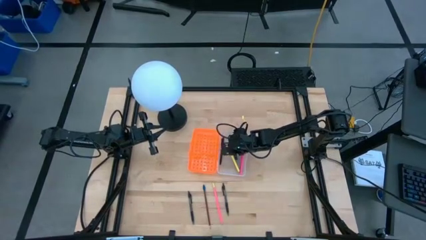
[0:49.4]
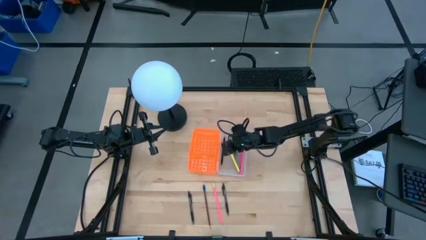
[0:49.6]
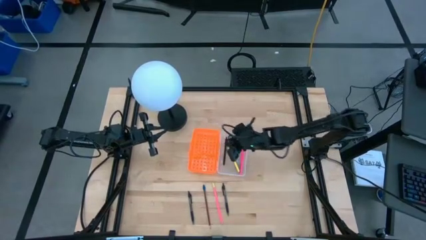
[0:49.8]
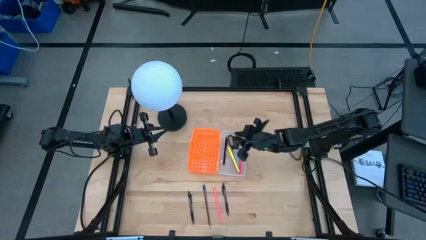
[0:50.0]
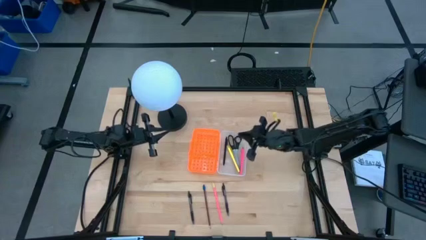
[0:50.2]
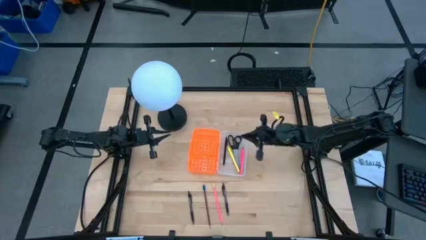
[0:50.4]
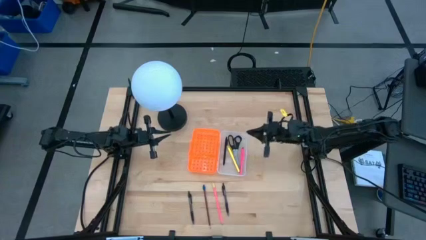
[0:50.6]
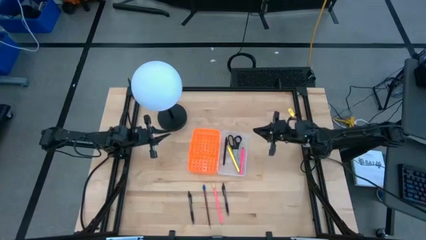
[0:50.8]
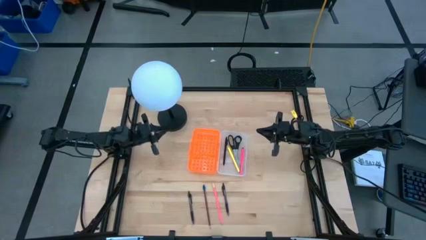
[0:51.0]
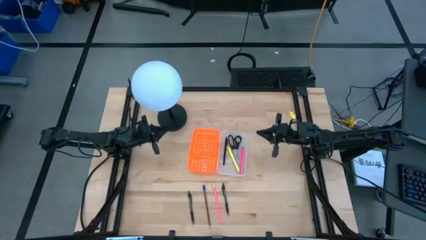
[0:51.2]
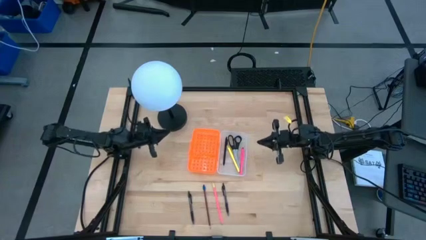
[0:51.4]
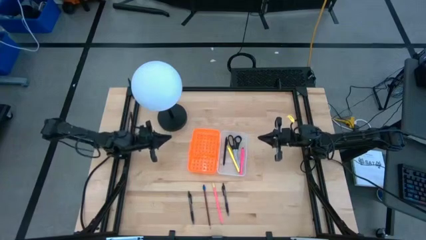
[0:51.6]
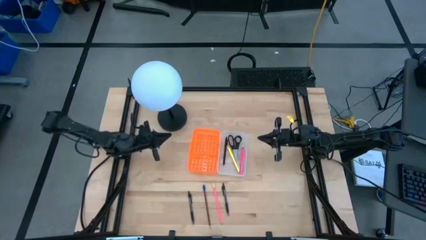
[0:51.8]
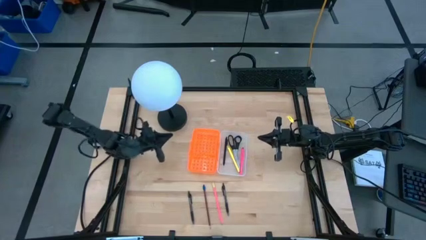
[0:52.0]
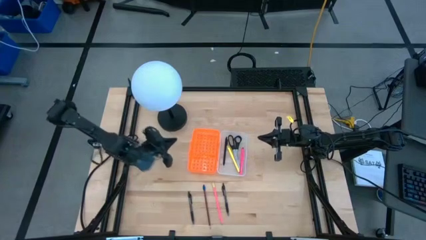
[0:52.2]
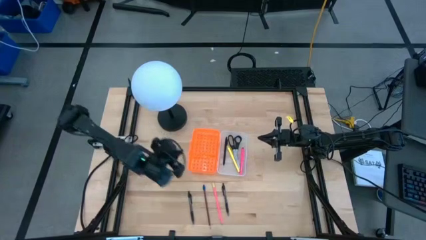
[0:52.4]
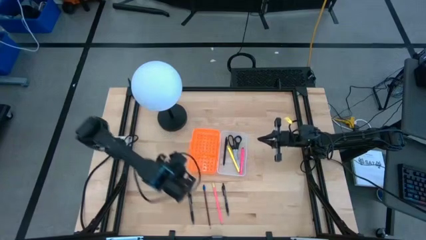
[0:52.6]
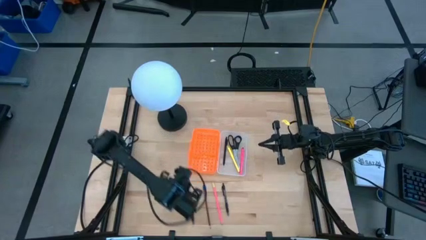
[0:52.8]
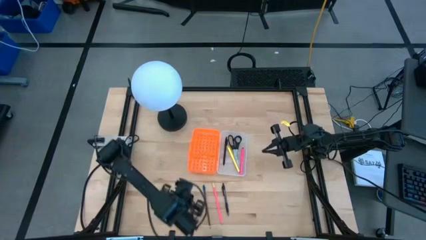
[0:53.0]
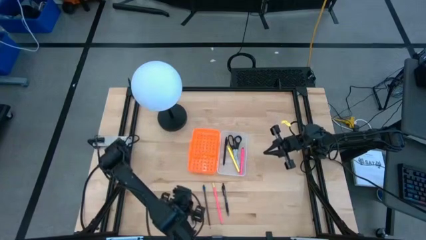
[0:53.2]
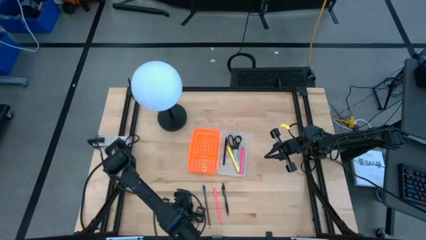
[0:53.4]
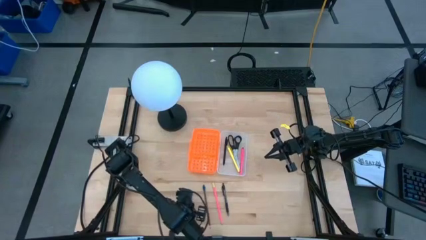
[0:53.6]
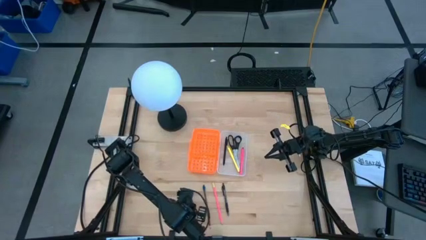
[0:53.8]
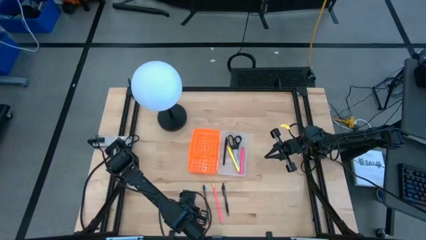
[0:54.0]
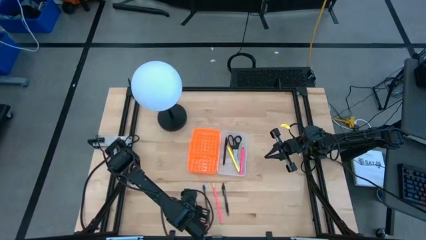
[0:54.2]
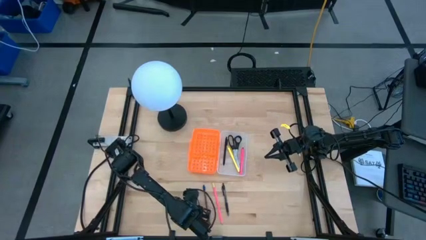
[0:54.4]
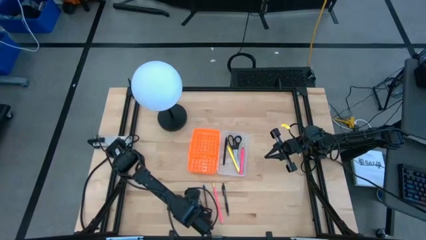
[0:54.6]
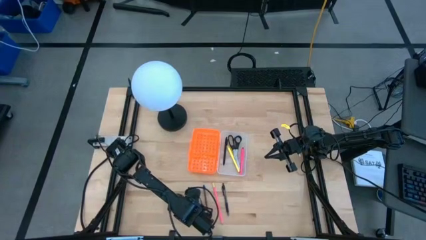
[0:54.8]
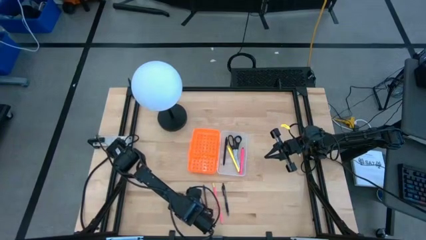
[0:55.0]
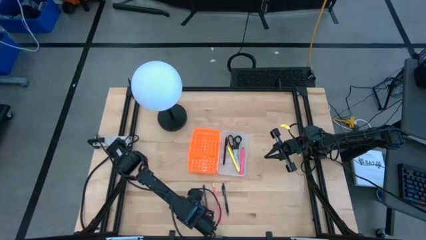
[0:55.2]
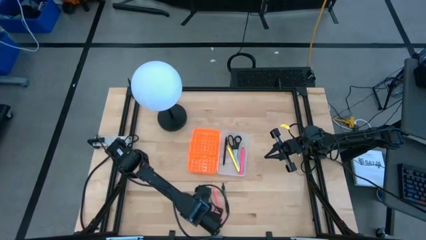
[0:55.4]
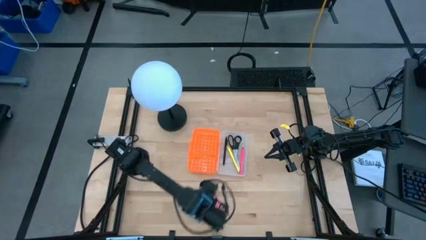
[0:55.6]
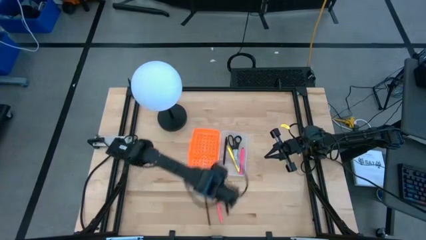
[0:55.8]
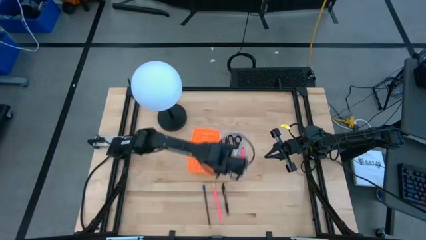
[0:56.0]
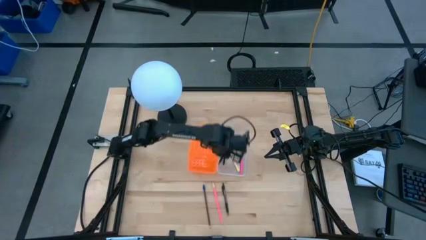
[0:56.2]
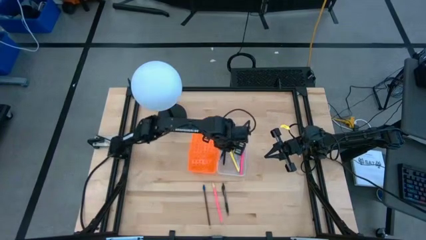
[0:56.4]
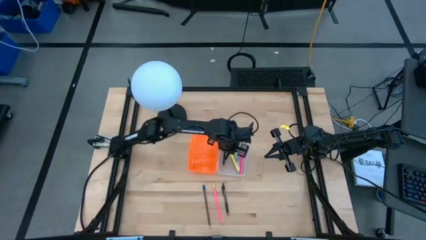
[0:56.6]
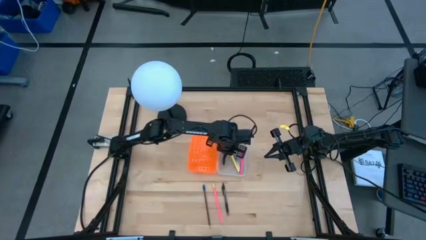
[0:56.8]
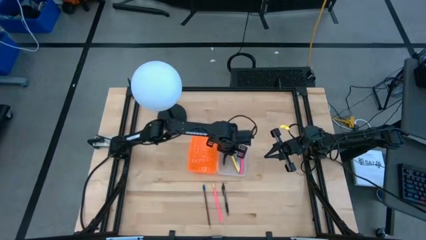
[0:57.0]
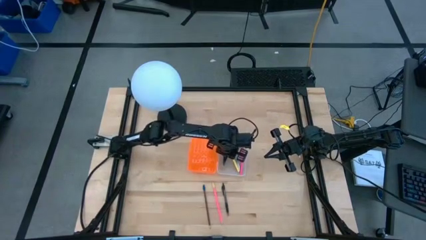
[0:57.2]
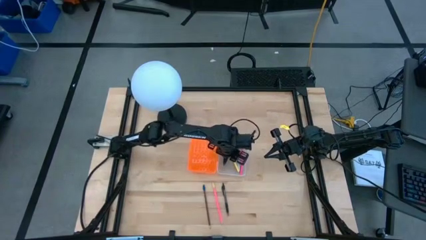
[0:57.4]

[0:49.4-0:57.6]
Task: Pick & place school supplies into a supply box
Put the left black pen into the orange supply box

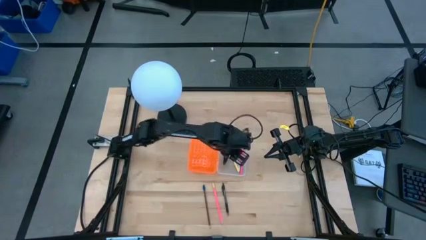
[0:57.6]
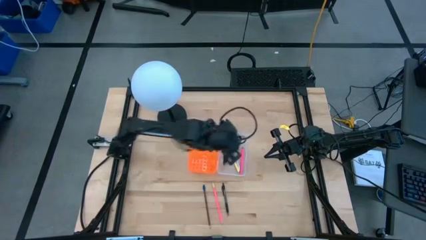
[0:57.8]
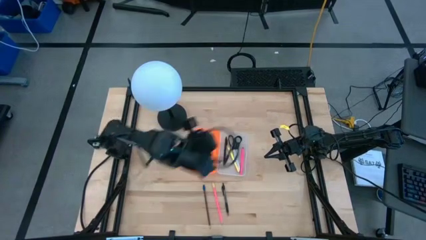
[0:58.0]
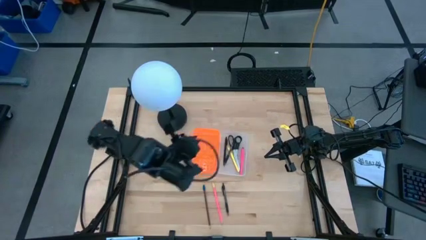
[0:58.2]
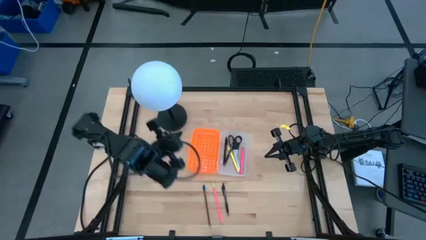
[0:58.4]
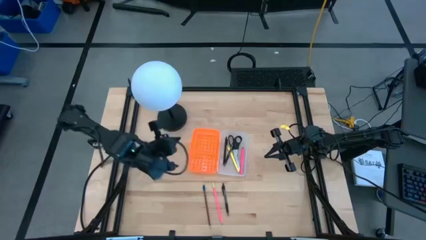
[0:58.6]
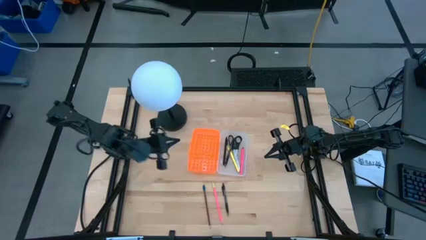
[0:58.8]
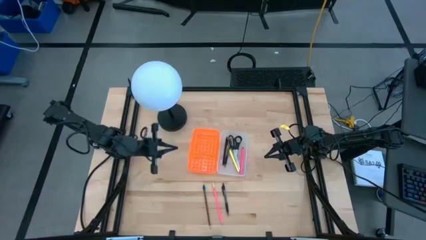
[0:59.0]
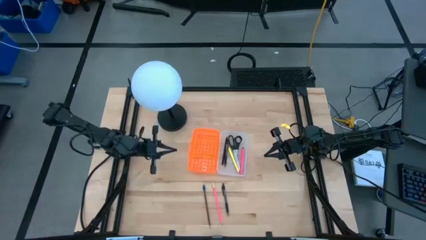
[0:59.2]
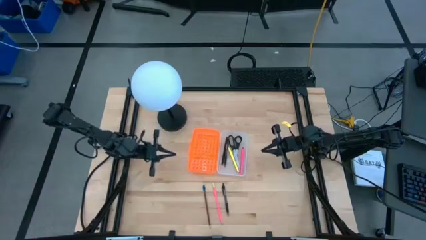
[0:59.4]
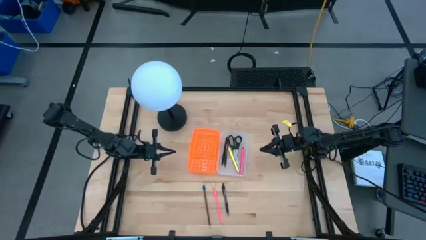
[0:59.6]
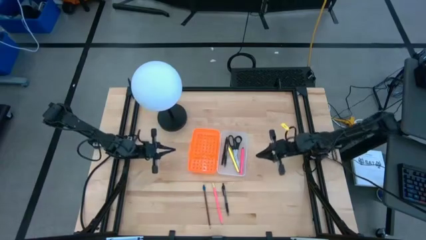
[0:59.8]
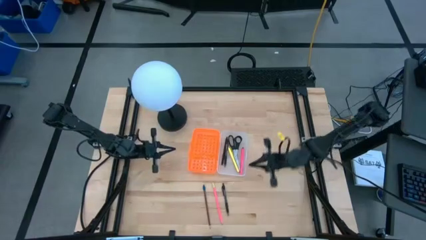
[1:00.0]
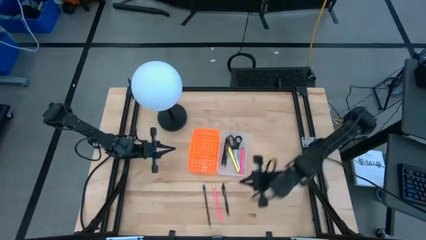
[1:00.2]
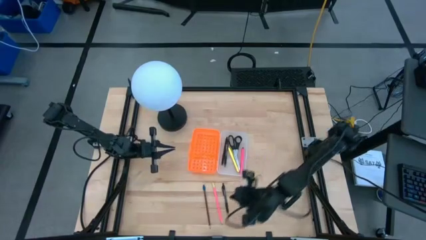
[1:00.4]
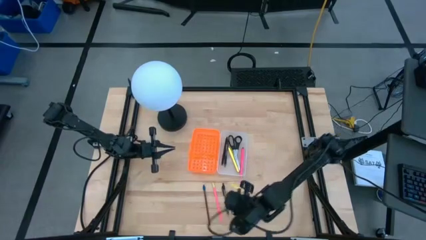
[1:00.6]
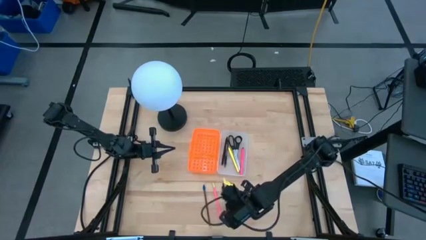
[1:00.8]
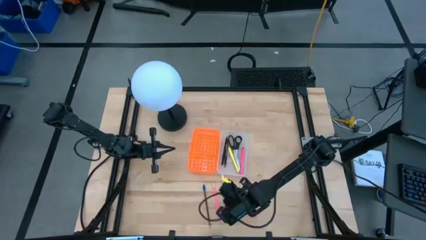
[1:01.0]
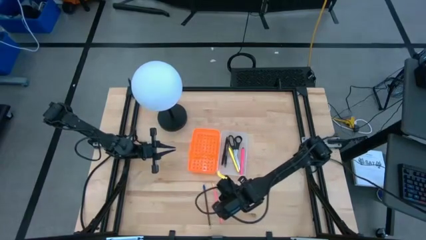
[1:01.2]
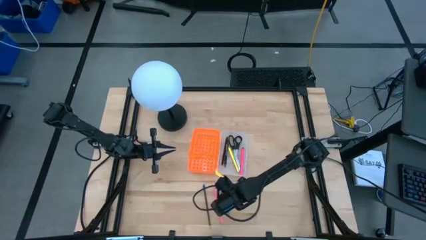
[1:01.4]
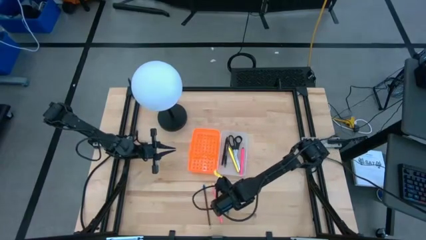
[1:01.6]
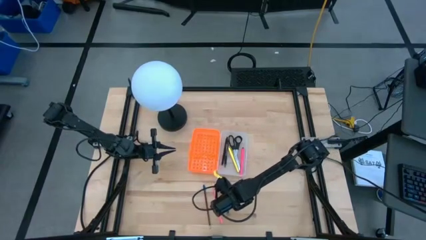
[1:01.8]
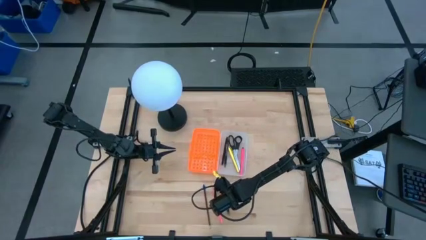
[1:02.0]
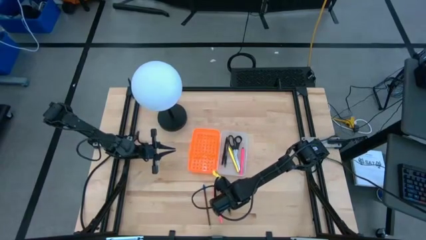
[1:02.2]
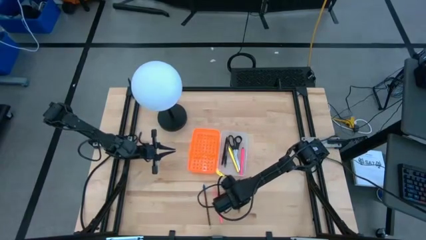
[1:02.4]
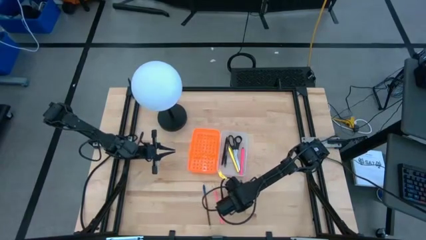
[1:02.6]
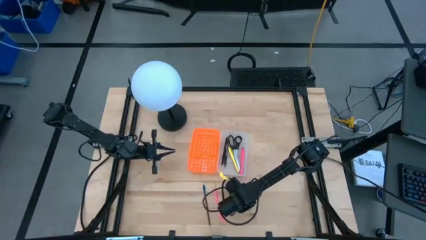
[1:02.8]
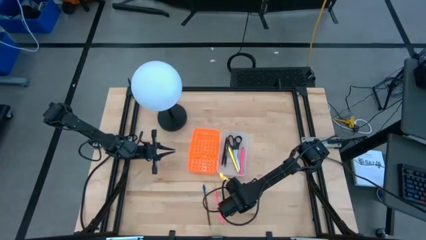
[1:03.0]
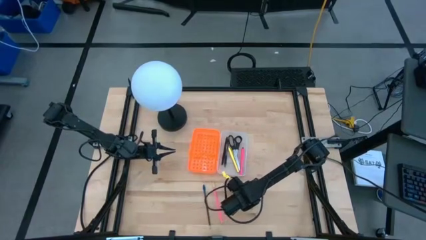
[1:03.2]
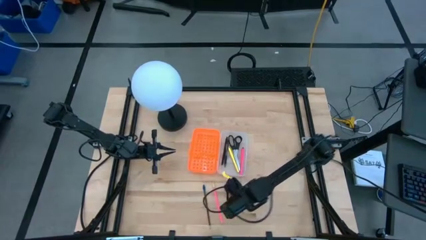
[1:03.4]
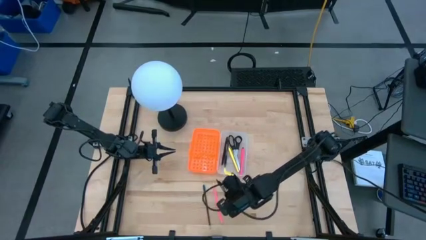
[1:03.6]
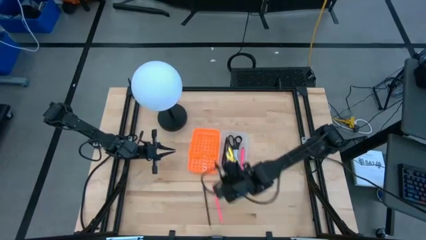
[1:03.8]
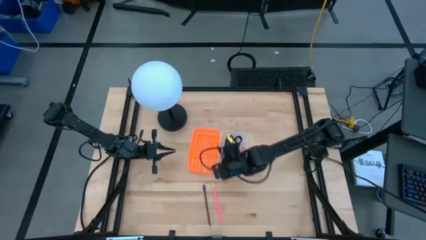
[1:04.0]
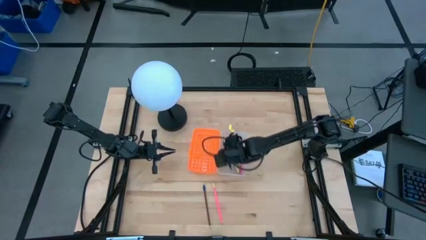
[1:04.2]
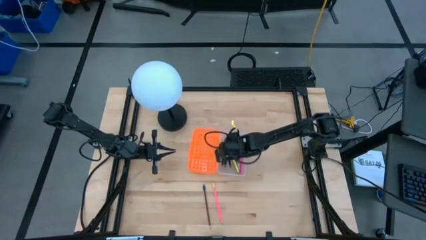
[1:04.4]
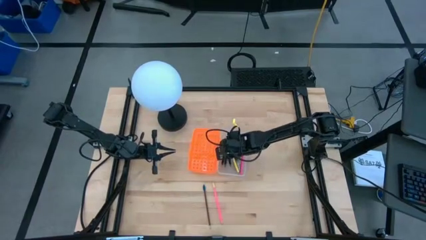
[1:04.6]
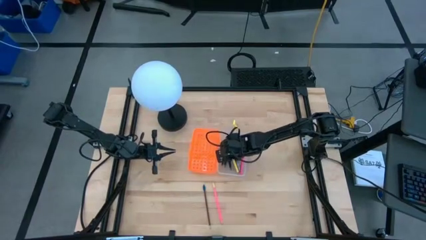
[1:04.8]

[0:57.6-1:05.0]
Put the black pen into the orange supply box
